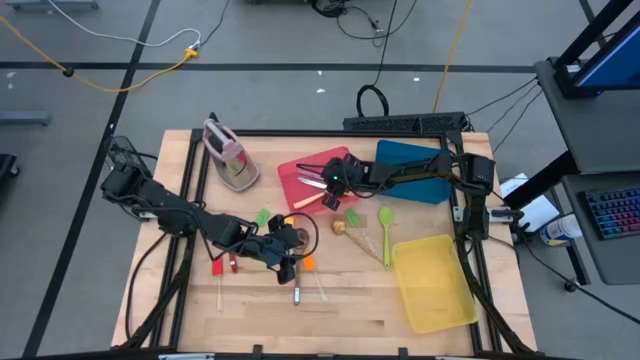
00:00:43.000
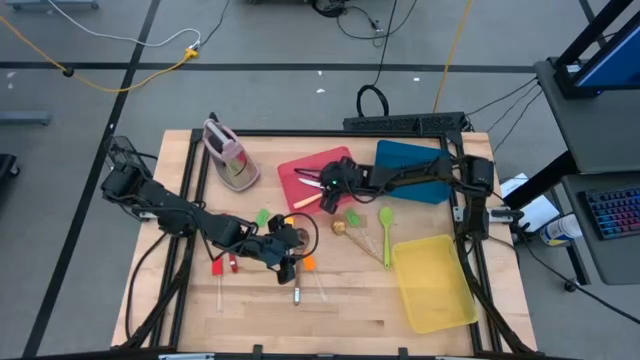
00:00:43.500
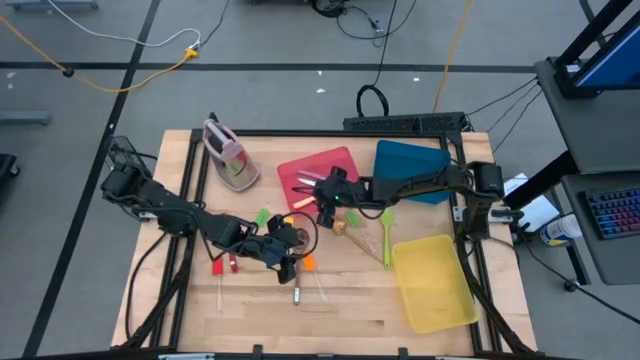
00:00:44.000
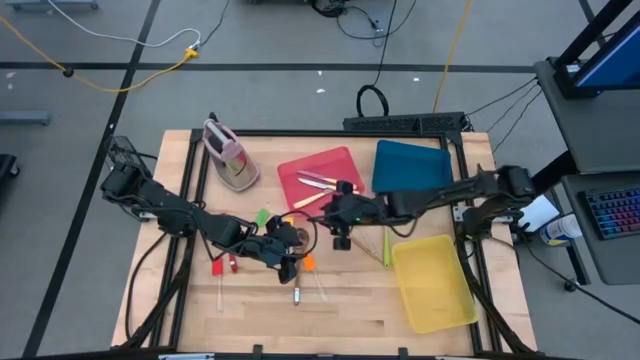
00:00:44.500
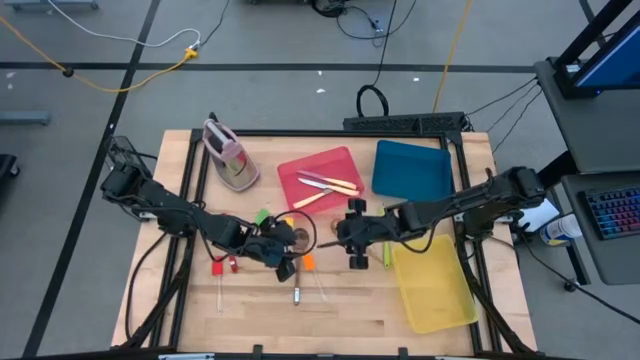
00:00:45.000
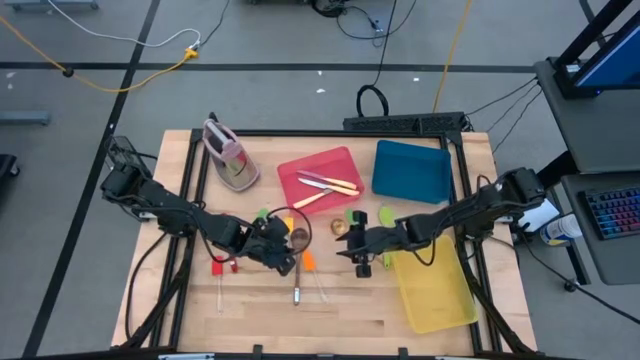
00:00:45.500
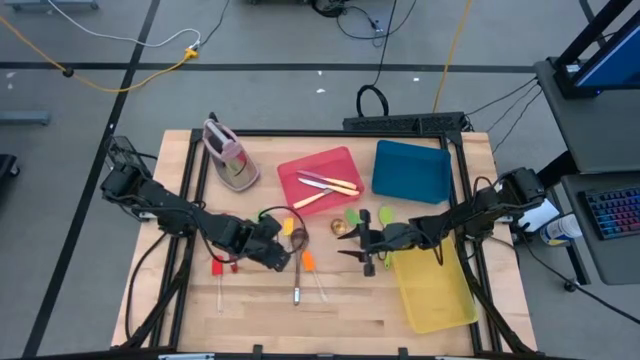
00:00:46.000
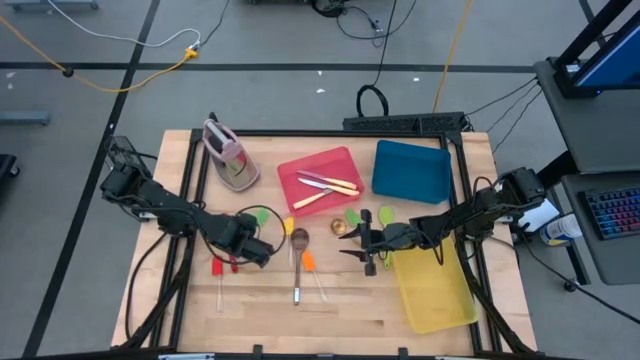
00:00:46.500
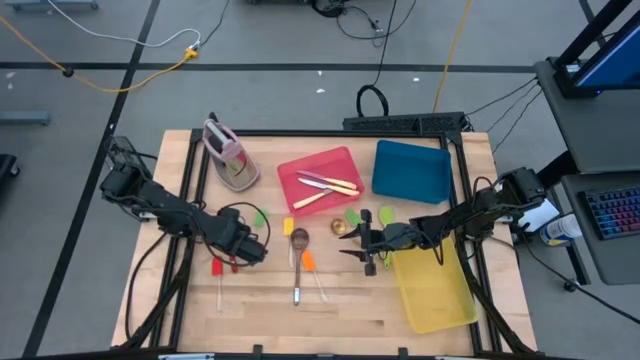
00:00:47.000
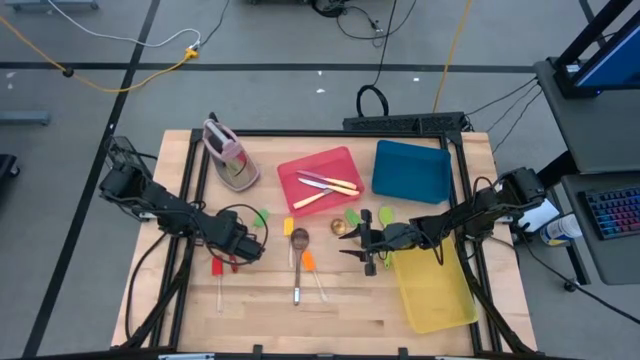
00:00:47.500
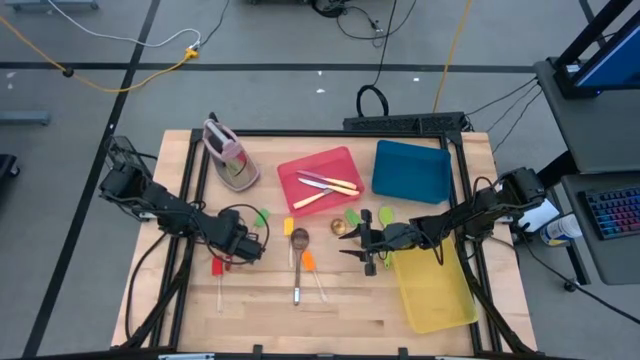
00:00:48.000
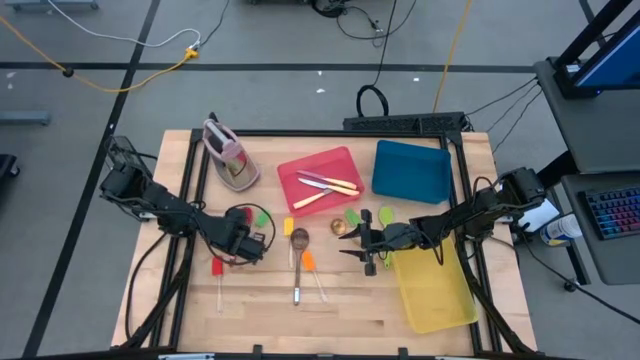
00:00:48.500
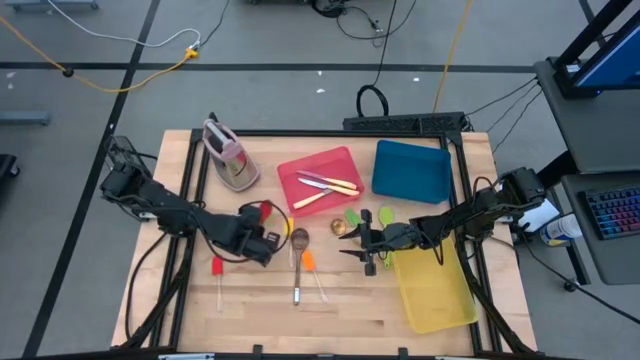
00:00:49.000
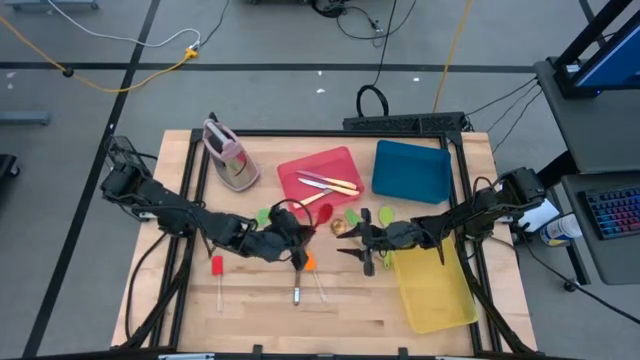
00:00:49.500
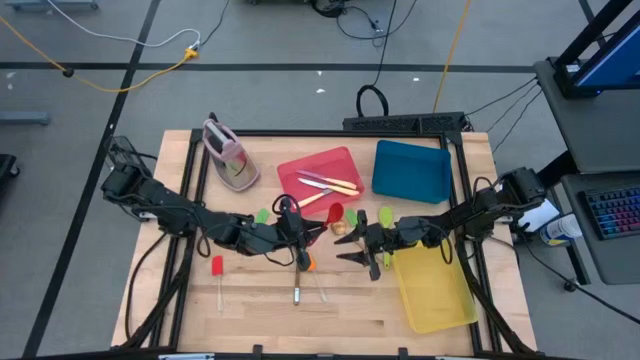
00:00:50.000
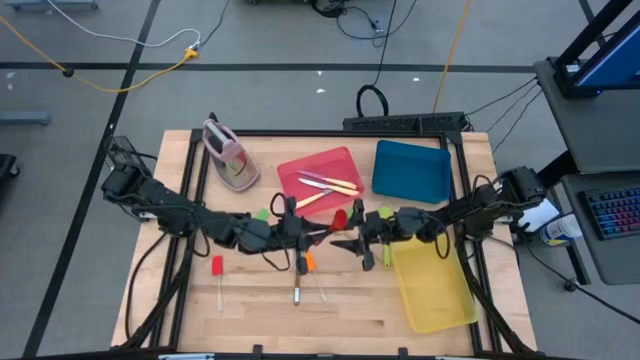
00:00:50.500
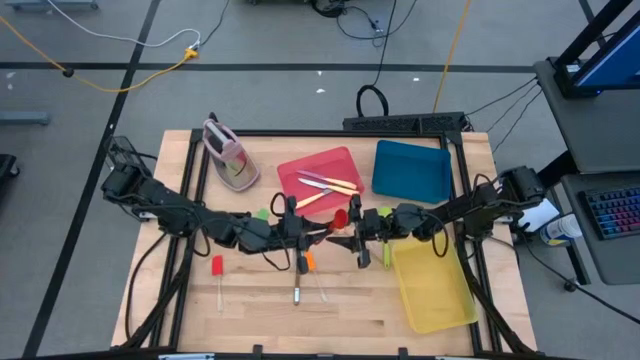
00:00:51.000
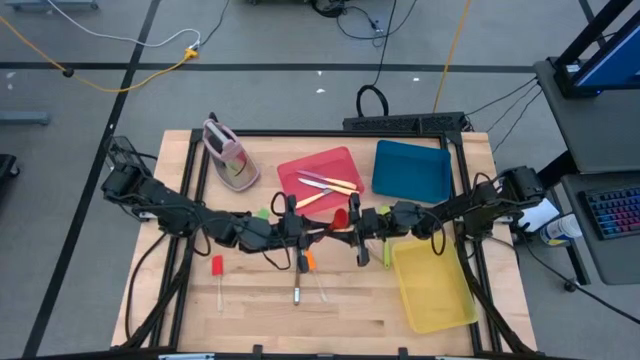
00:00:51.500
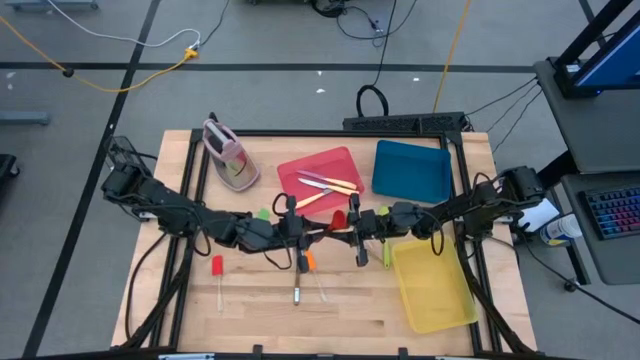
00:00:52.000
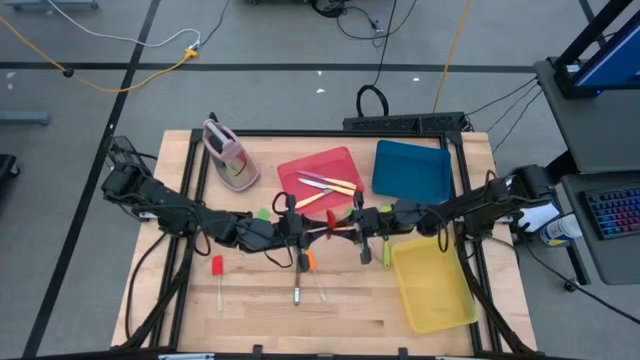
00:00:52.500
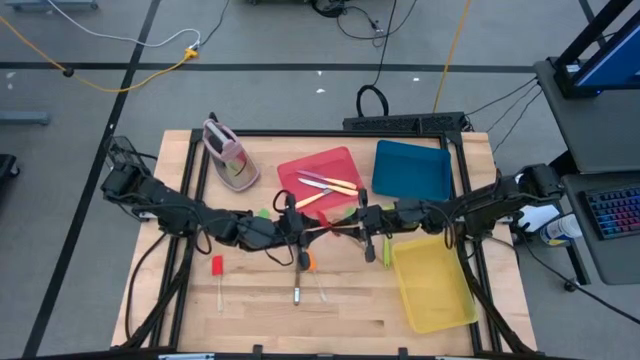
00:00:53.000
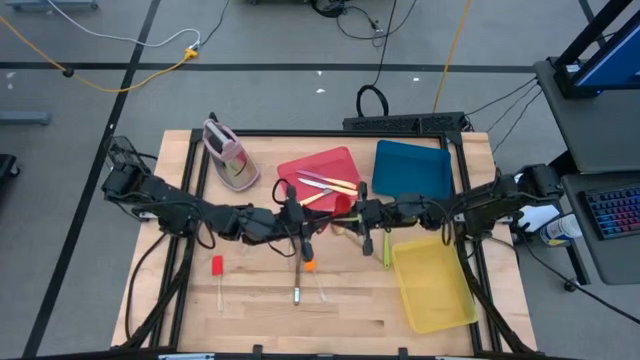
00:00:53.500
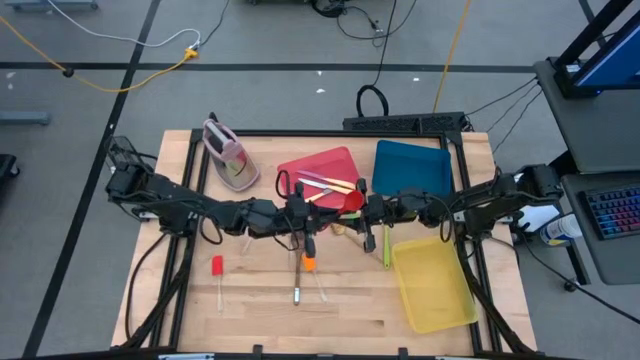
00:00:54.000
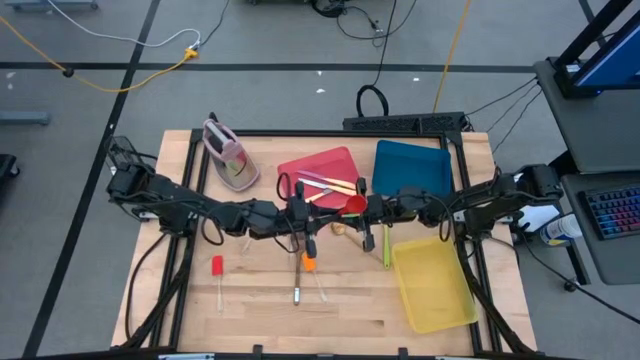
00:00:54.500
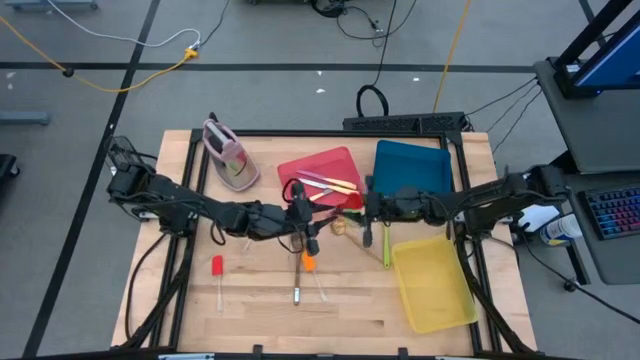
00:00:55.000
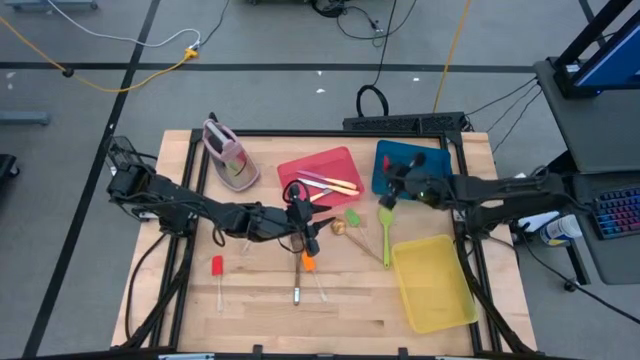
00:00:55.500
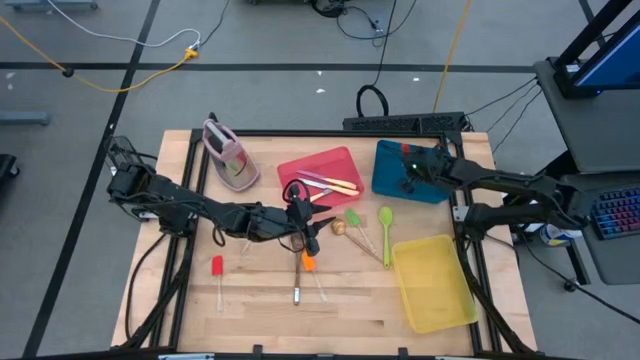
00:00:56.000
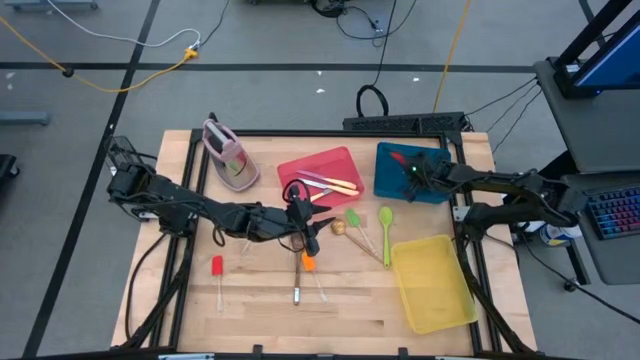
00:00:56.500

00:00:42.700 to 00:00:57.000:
Task: Pick & Place Kitchen Items
Put the red serving spoon into the blue bin

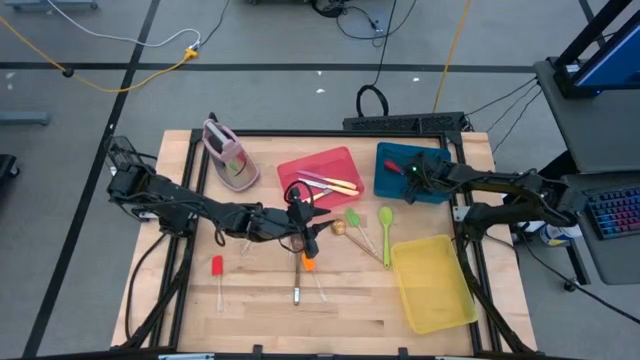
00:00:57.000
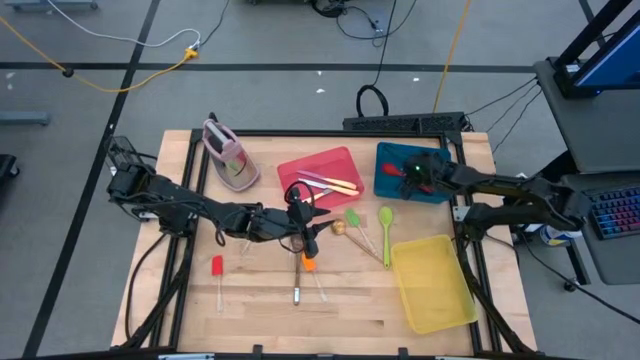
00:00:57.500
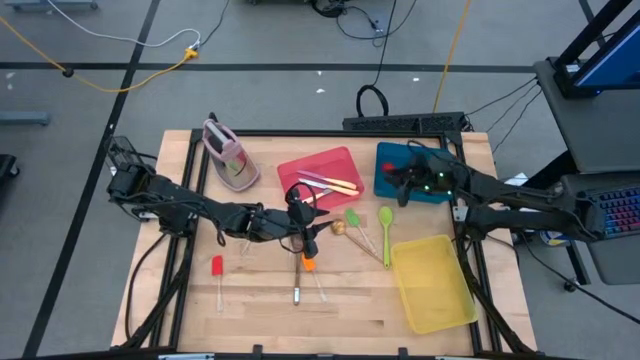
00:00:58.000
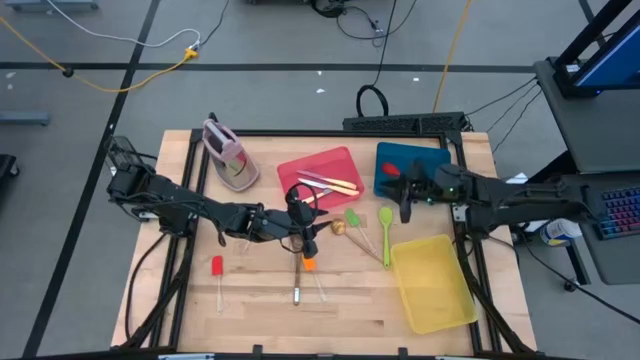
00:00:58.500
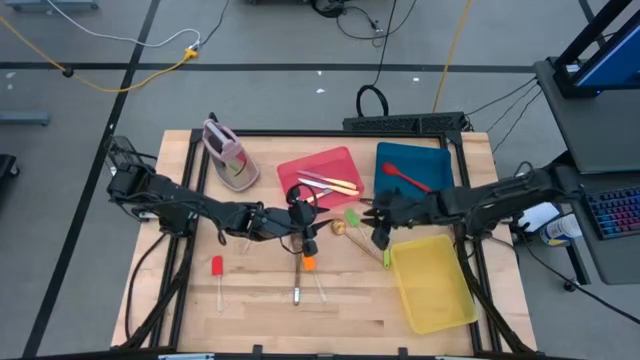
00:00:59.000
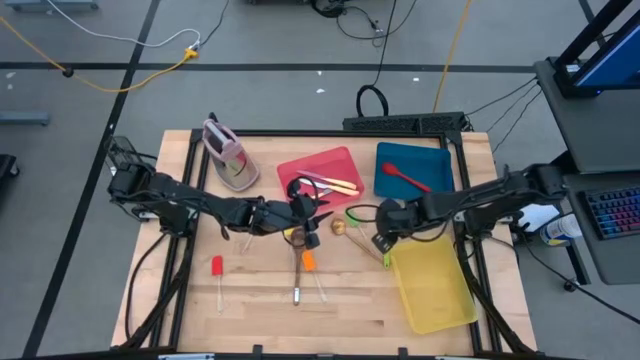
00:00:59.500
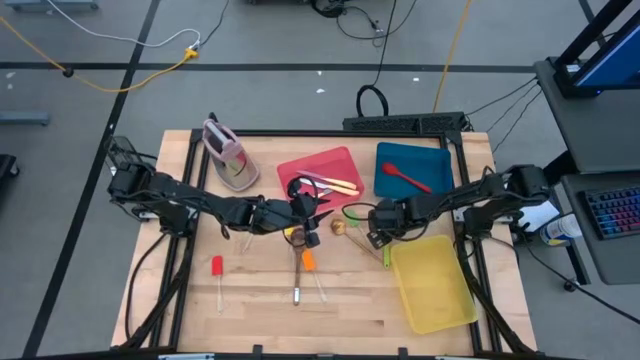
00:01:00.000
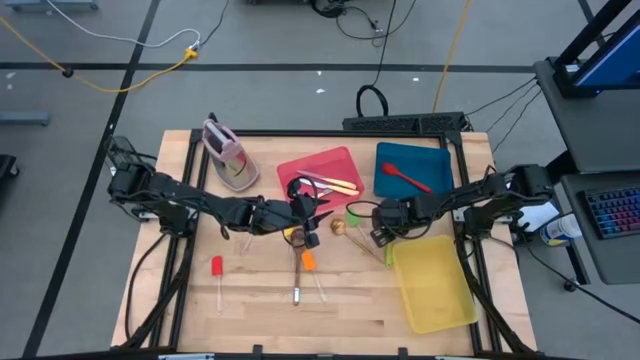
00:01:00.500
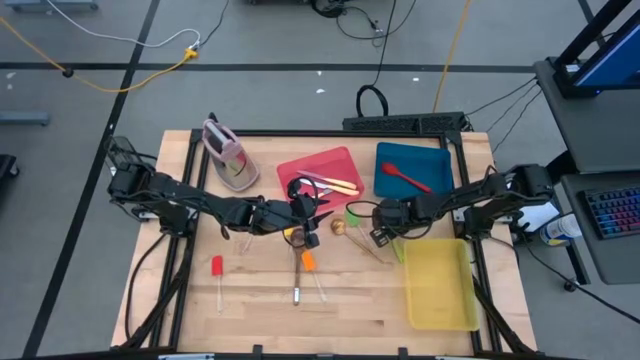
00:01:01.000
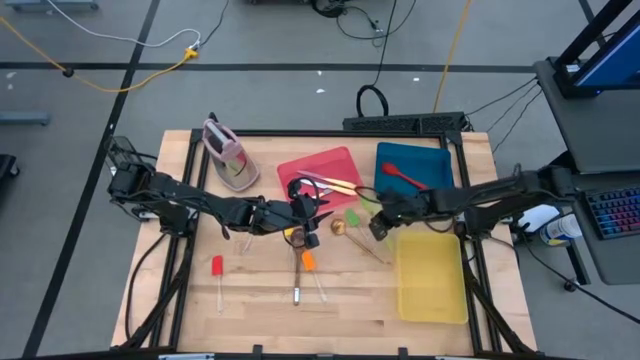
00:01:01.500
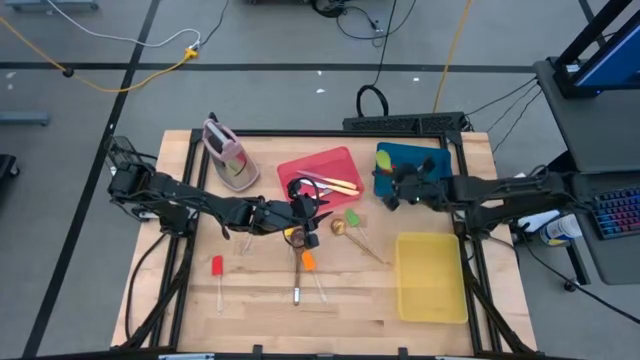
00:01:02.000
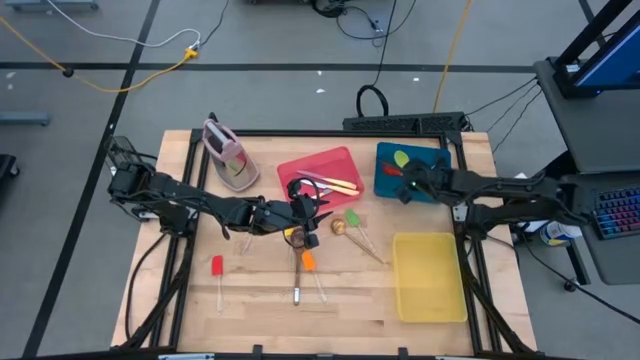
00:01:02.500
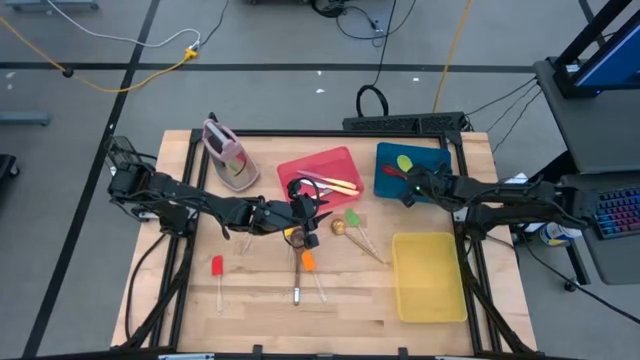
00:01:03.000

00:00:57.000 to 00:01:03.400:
Put the green serving spoon into the blue bin

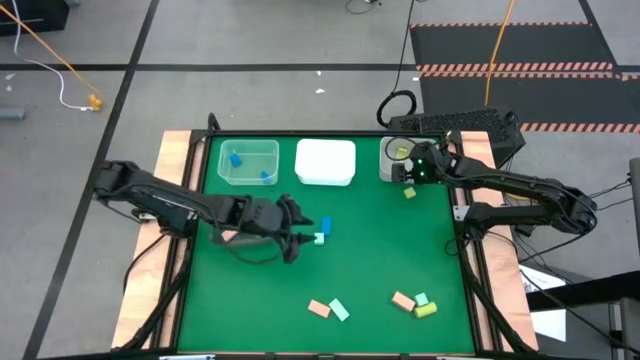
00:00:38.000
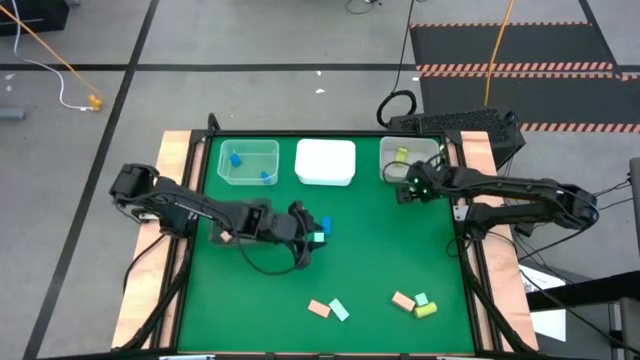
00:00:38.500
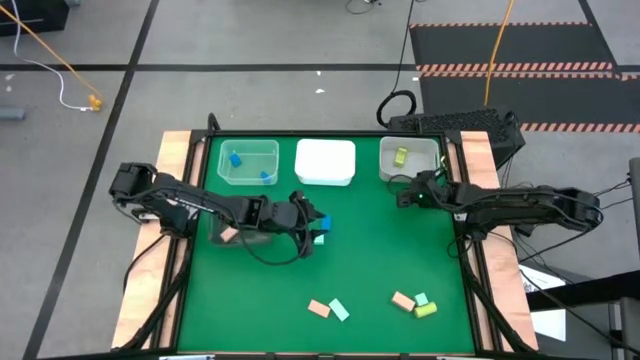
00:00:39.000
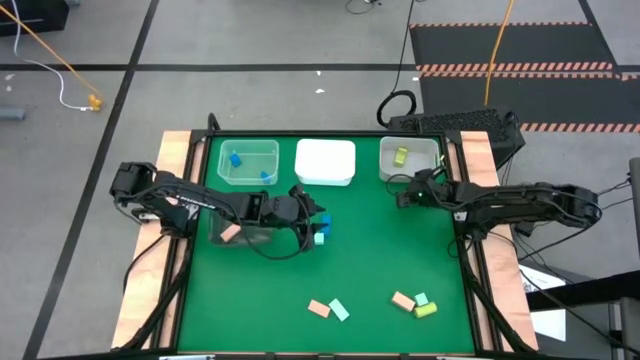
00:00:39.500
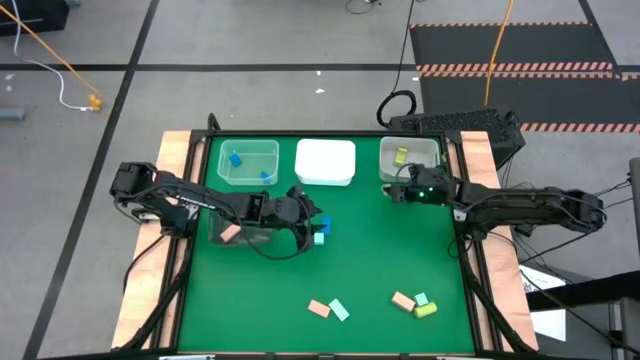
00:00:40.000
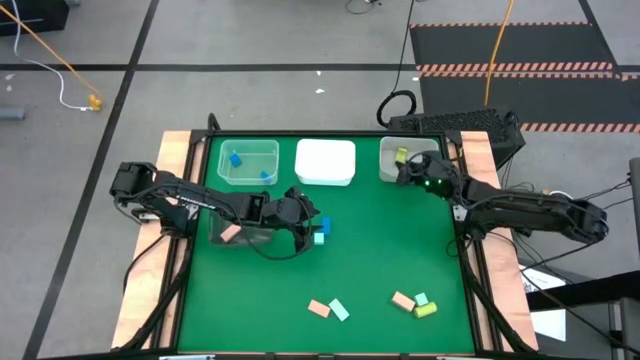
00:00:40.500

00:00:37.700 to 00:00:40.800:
Task: Sort & place blocks by color
Put the light green block into the gray bin
